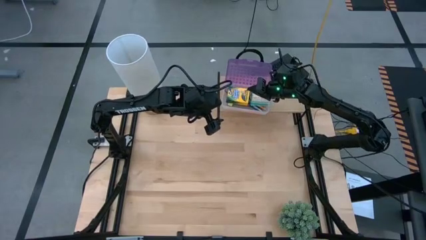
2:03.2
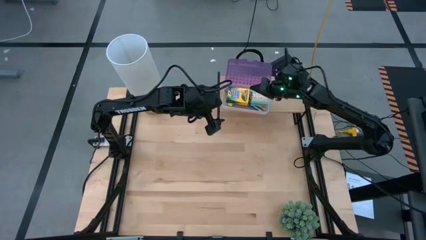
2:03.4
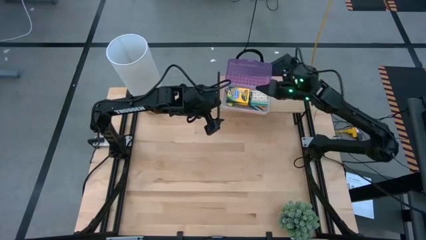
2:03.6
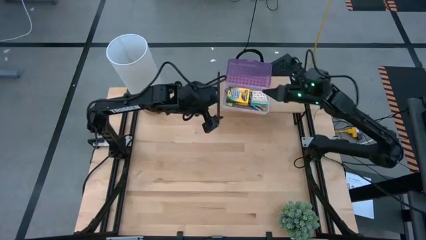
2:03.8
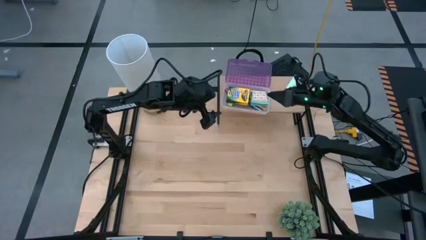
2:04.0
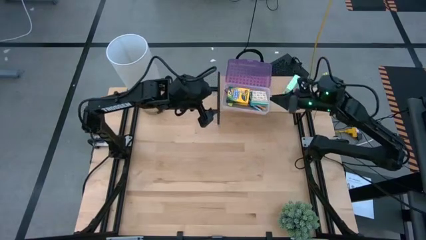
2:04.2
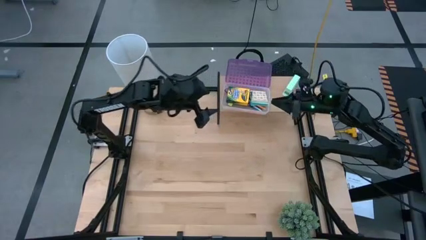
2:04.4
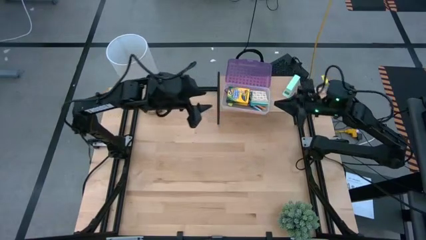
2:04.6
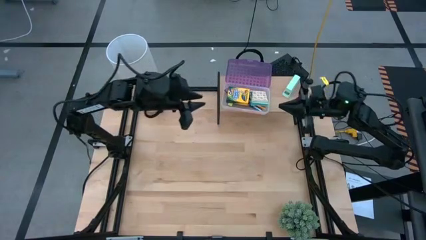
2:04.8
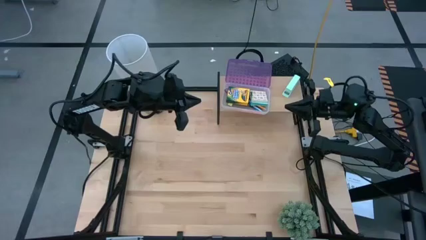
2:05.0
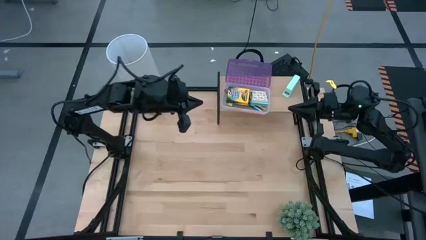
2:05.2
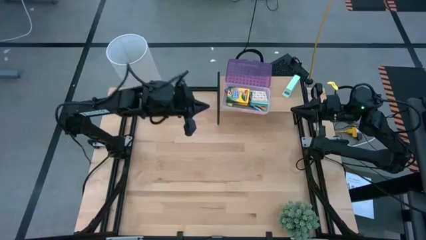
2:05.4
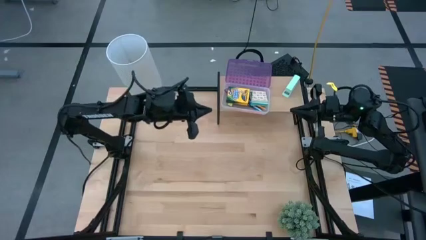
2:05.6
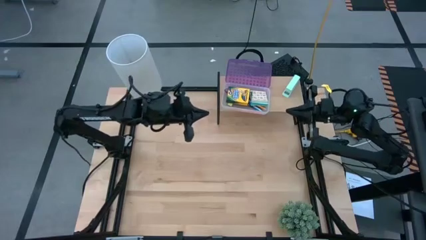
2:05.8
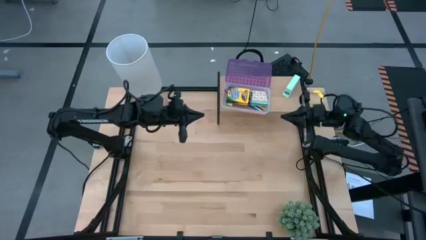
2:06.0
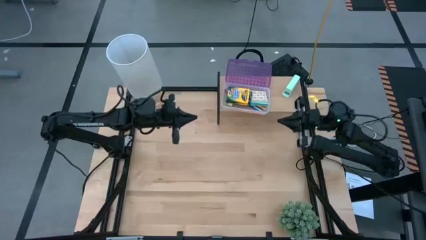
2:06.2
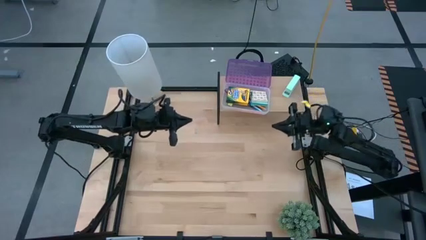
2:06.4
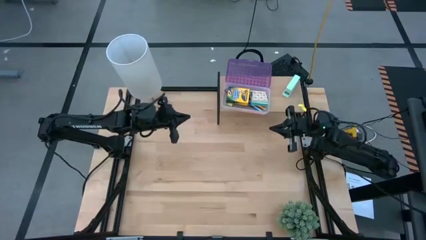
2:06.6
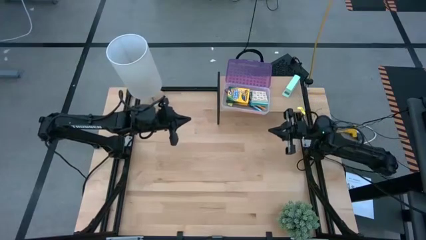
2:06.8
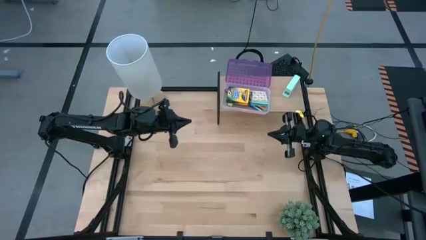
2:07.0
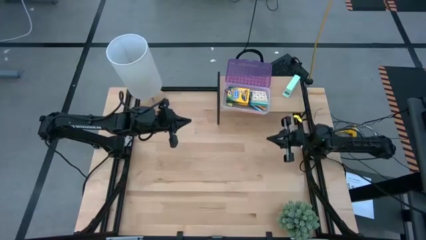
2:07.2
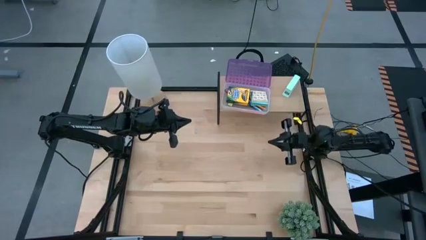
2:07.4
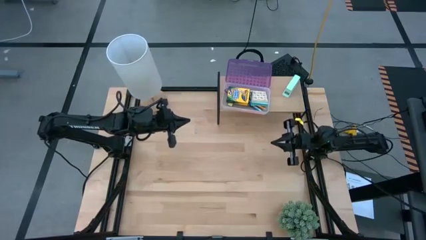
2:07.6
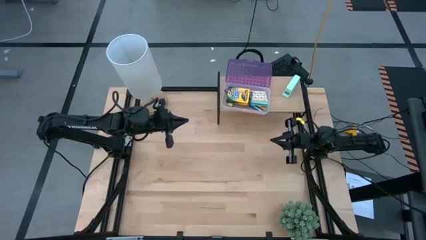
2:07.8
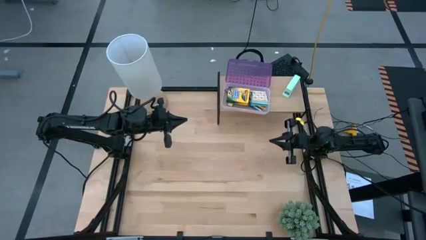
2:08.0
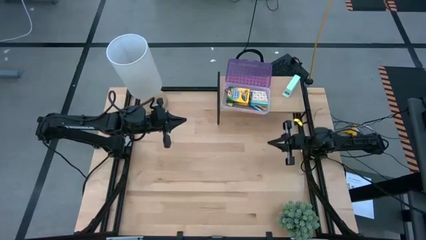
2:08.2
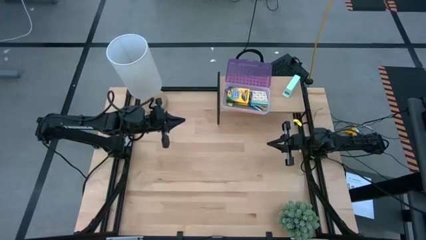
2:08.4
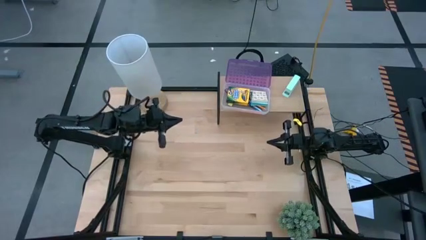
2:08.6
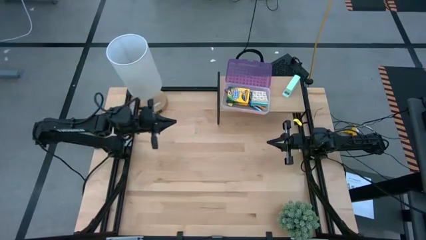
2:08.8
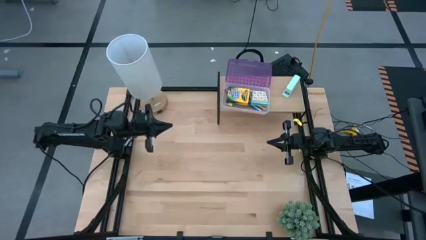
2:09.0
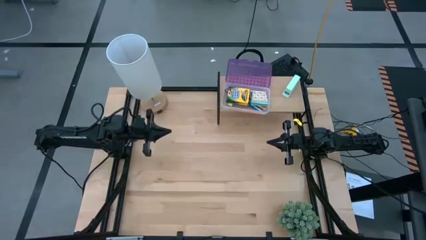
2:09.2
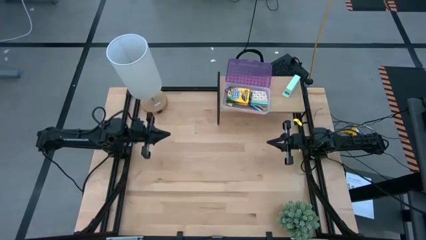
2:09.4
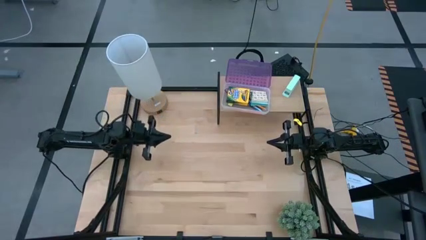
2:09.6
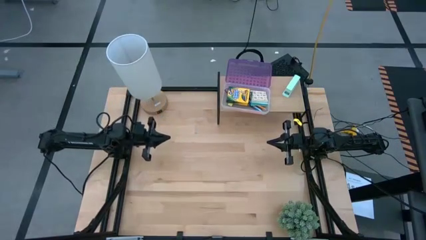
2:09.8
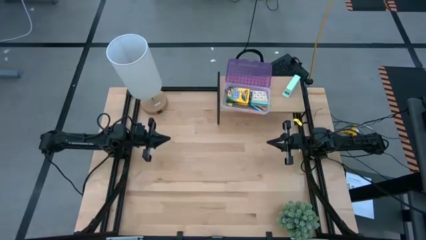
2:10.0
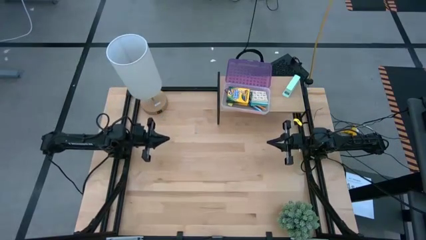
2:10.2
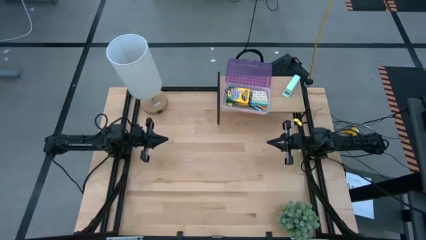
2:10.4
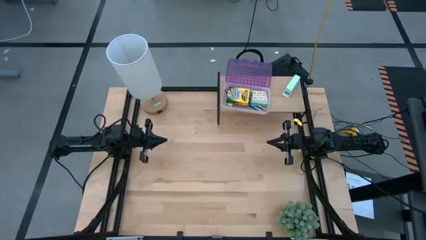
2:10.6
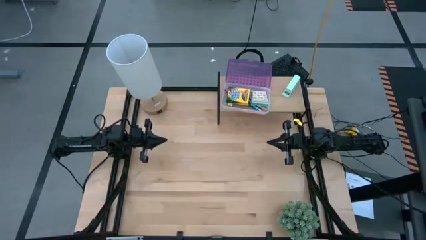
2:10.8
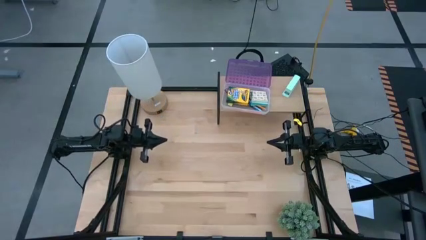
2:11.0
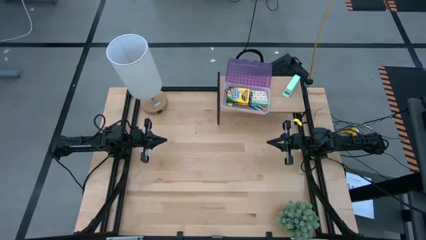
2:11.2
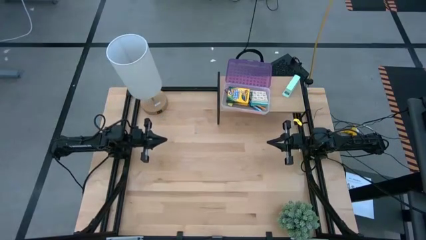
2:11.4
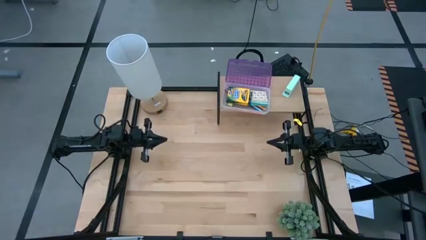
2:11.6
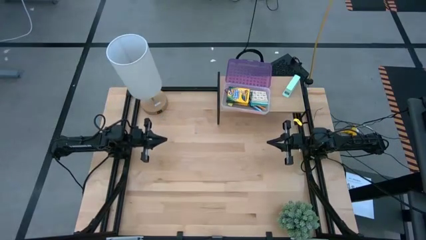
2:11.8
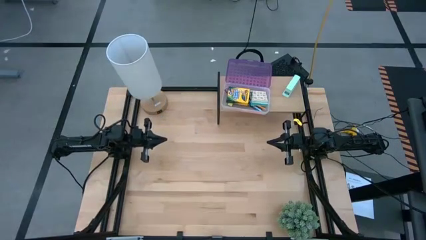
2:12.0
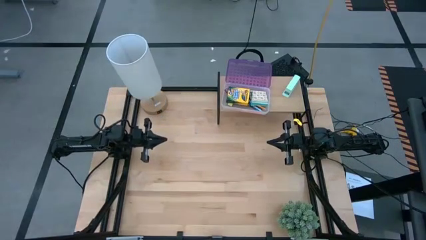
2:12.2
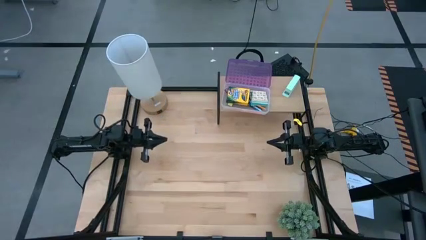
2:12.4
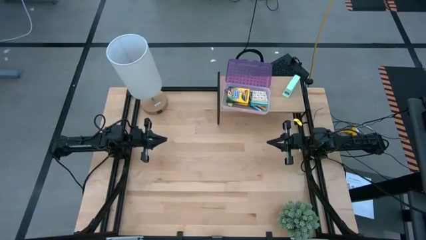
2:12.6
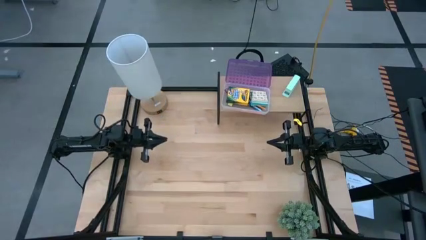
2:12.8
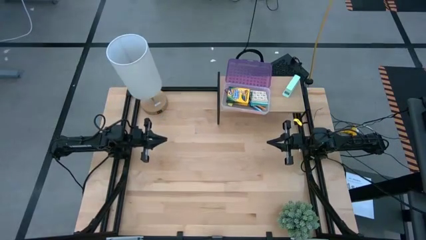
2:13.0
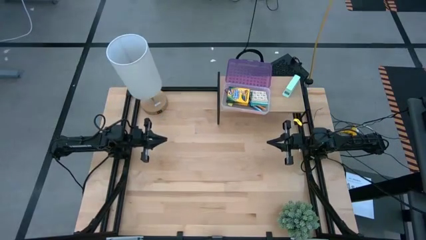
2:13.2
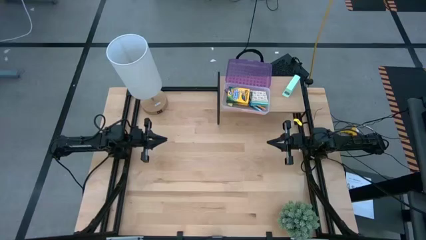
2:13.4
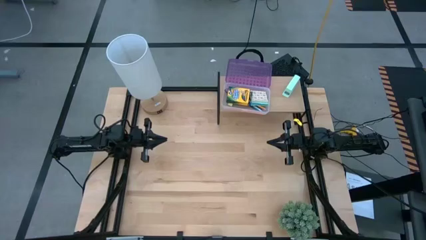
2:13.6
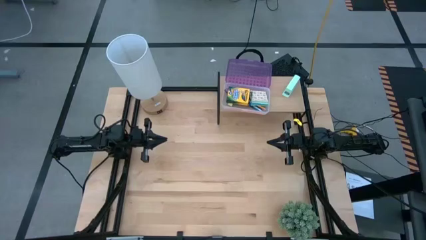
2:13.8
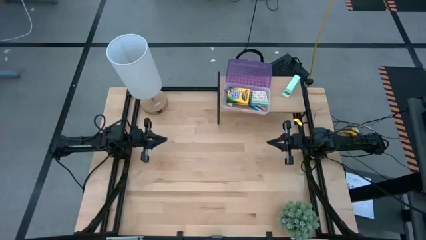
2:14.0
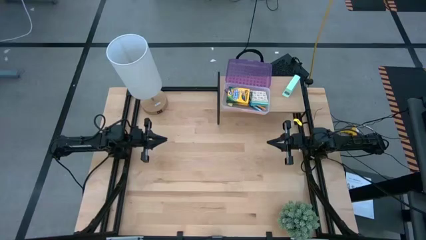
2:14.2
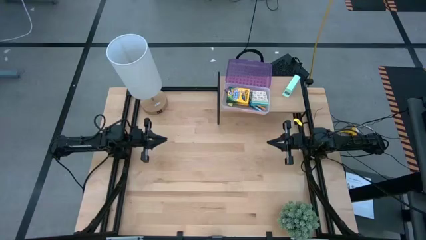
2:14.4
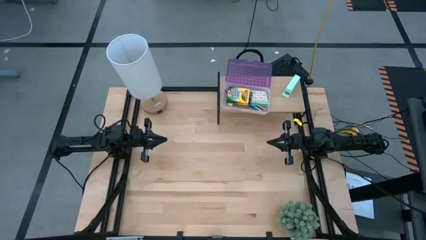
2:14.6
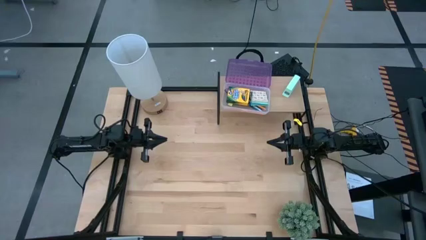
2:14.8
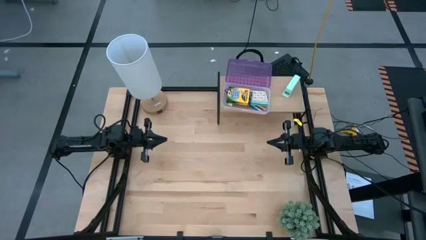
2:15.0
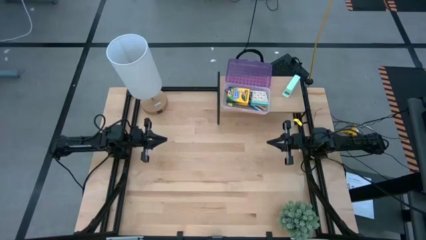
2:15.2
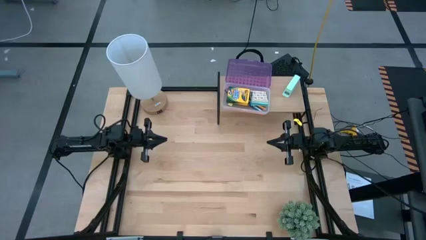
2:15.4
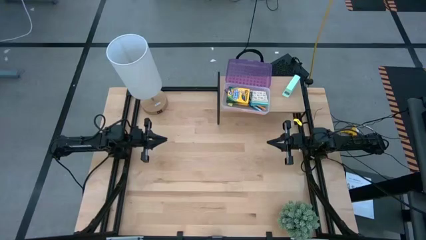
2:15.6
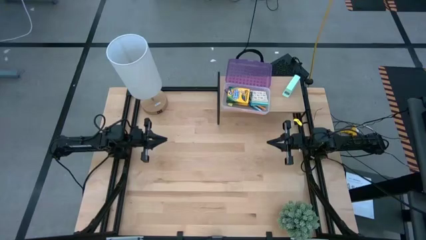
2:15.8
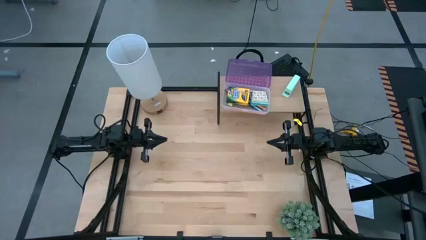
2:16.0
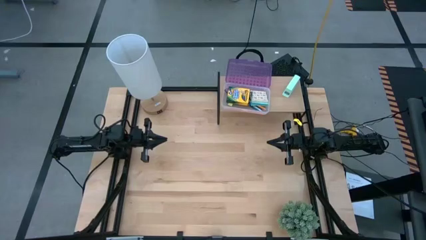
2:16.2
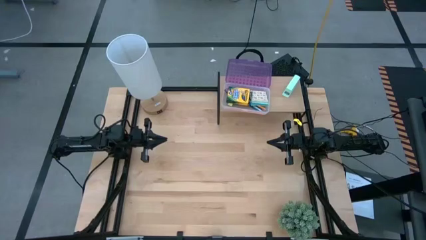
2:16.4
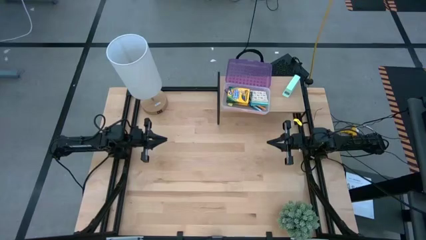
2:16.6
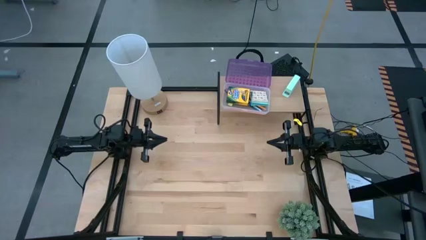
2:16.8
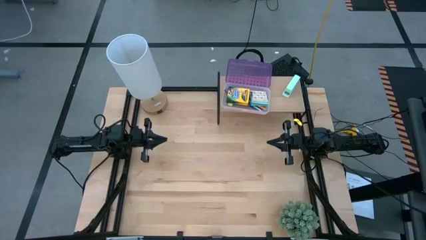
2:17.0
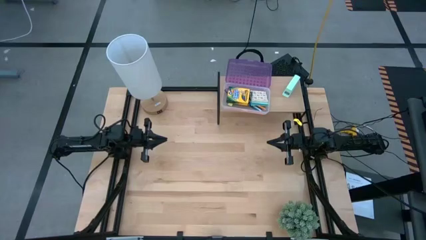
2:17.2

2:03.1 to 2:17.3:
Task: Pick & place school supplies into a supply box
Return to Home Position

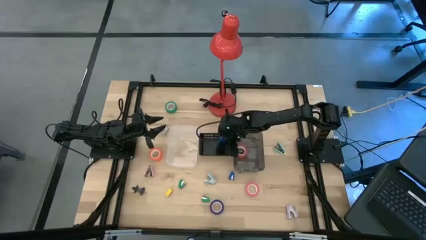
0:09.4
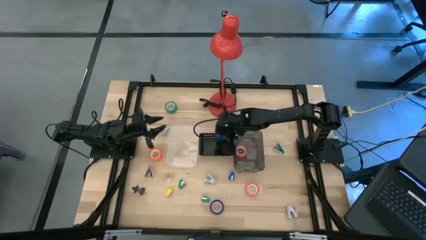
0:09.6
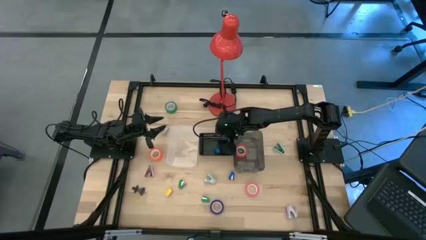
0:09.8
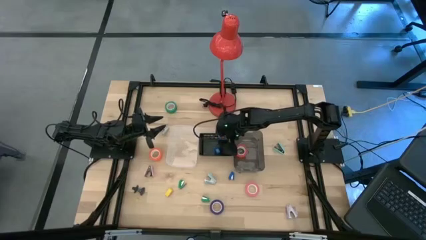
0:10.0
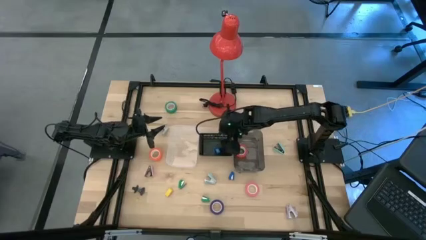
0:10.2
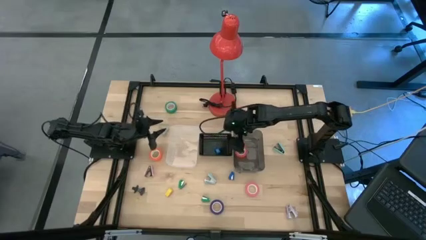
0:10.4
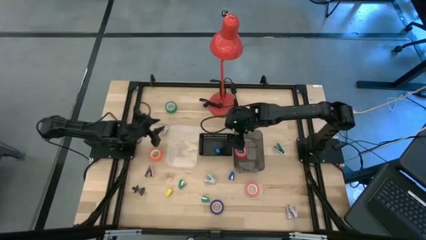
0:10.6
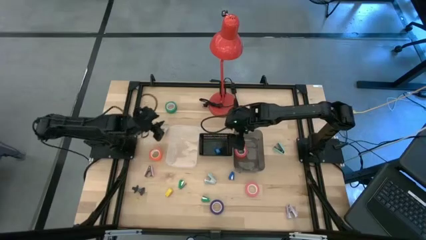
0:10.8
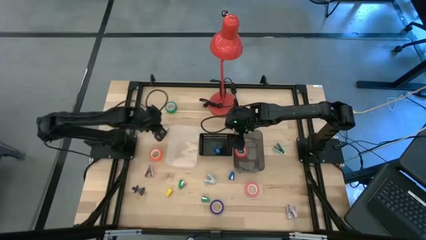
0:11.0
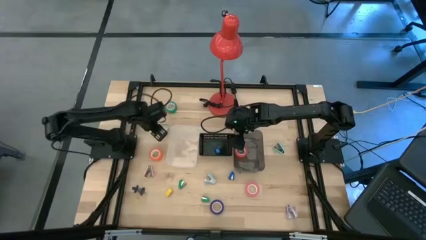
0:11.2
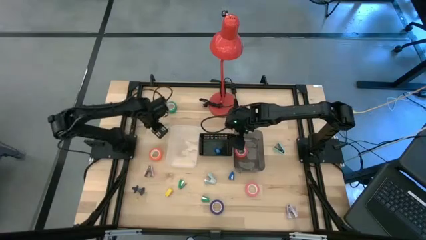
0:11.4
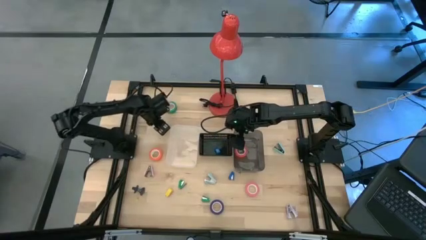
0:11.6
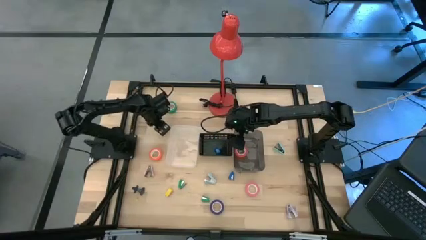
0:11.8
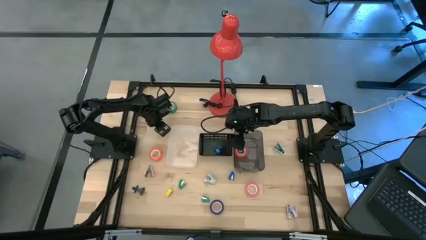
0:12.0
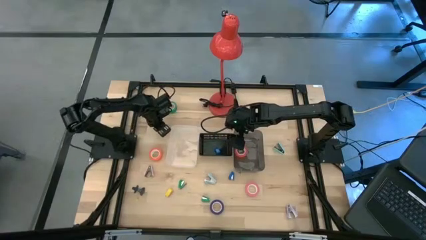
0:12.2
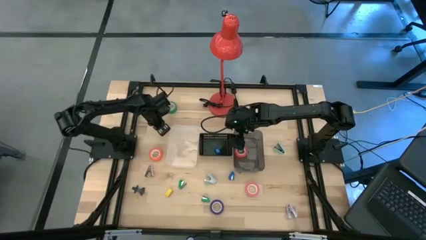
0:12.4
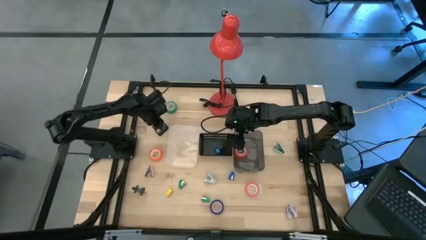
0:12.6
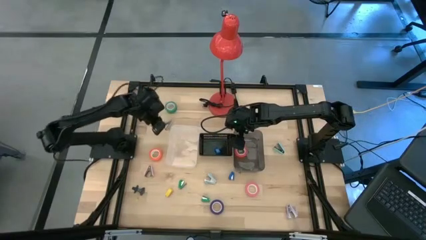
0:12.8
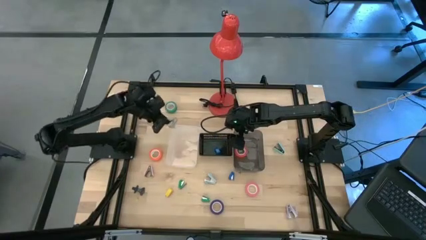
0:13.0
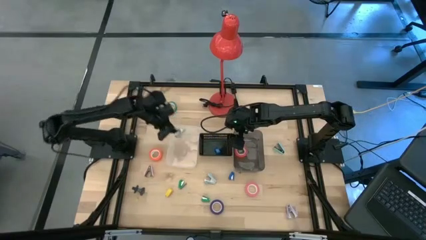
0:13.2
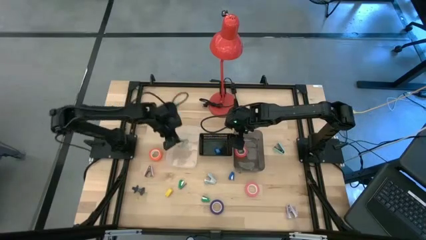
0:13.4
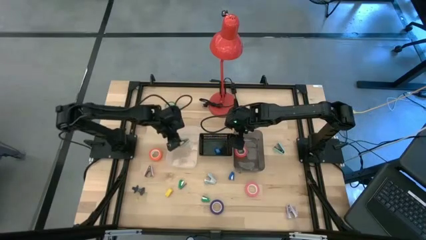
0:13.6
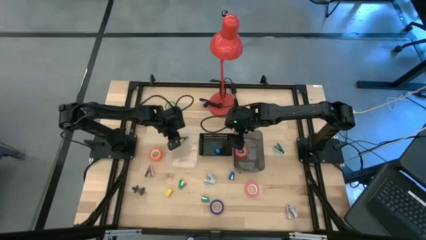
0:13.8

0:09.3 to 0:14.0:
Task: Pick and place Stapler, Stapler remover, tape
Put the gray staple remover into the transparent bin
